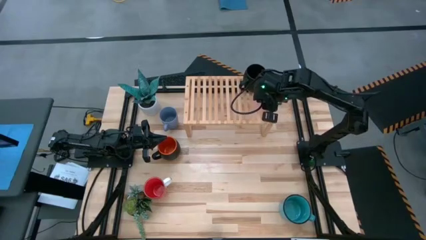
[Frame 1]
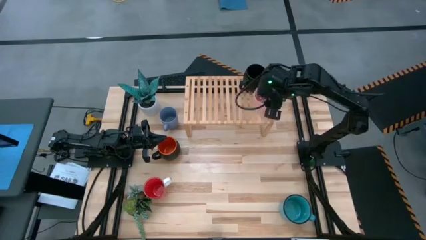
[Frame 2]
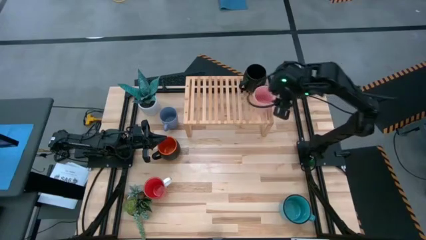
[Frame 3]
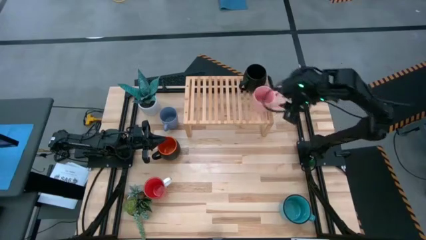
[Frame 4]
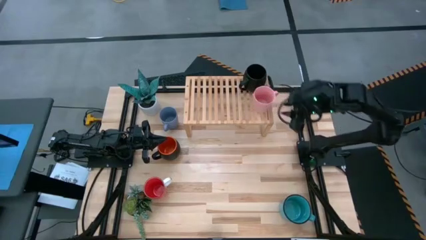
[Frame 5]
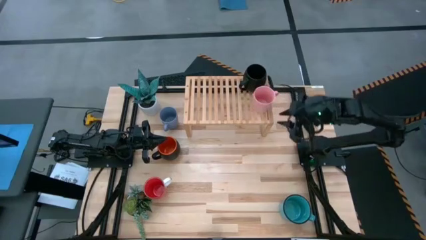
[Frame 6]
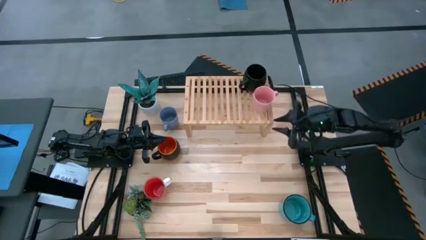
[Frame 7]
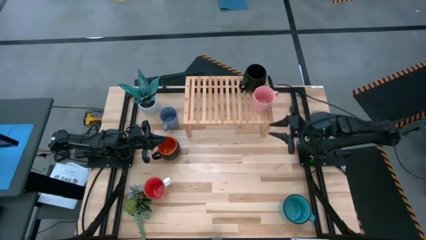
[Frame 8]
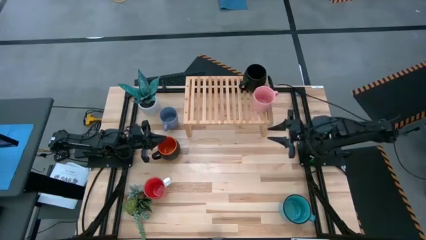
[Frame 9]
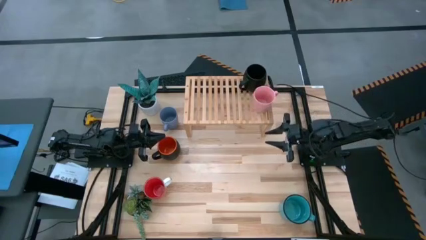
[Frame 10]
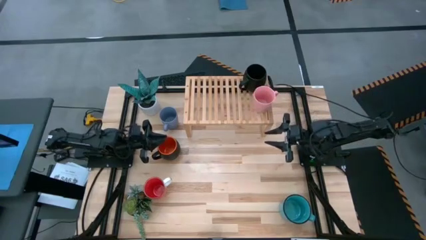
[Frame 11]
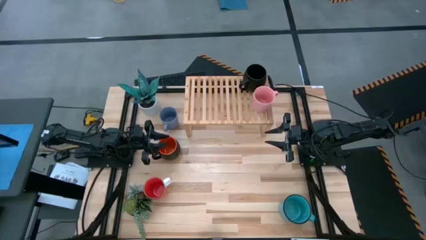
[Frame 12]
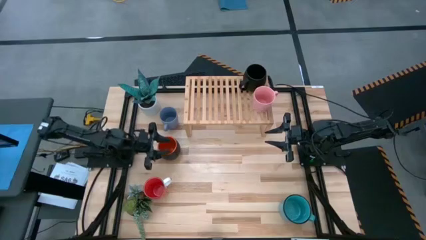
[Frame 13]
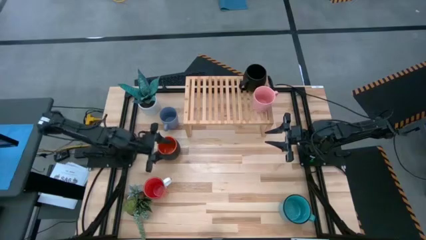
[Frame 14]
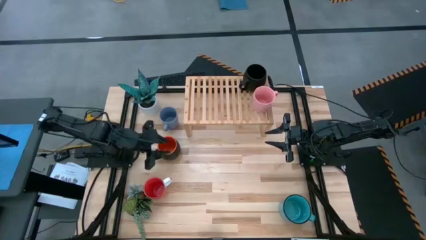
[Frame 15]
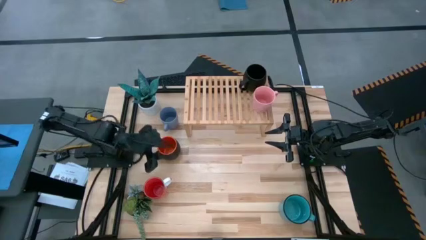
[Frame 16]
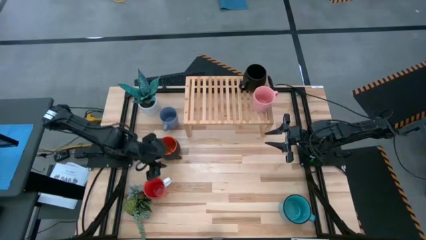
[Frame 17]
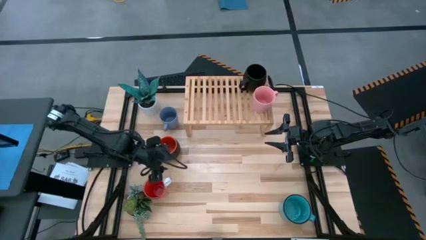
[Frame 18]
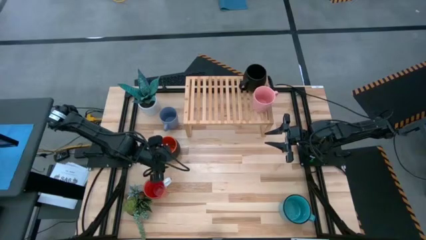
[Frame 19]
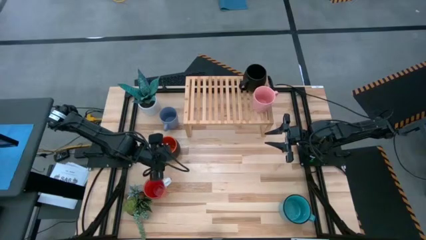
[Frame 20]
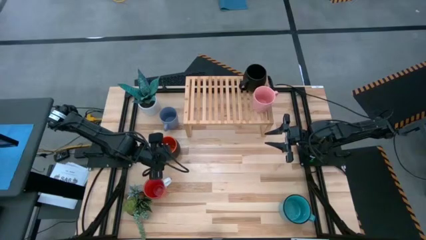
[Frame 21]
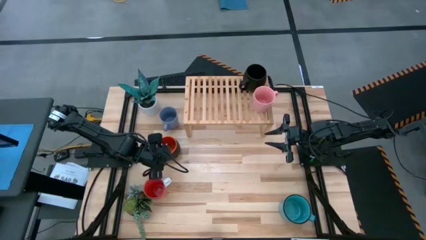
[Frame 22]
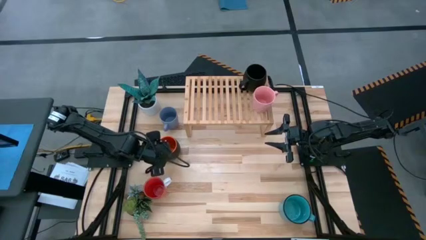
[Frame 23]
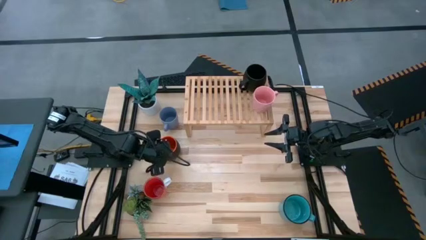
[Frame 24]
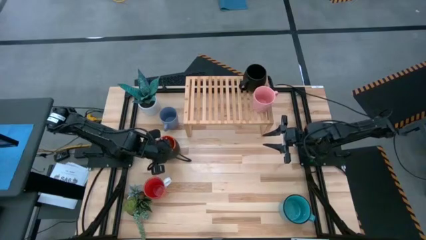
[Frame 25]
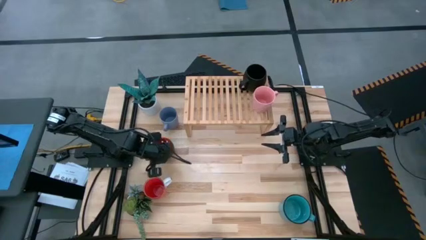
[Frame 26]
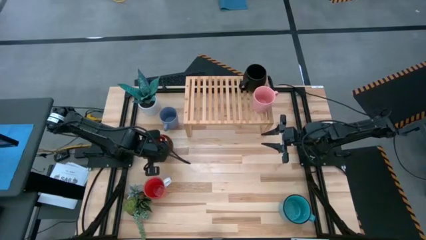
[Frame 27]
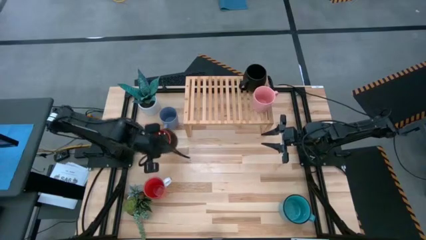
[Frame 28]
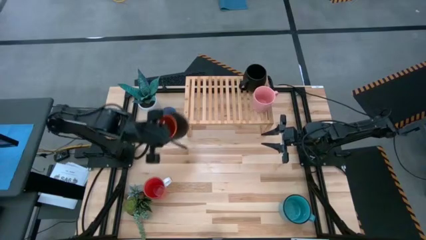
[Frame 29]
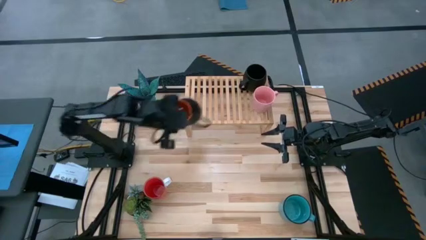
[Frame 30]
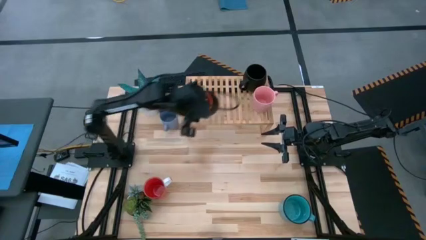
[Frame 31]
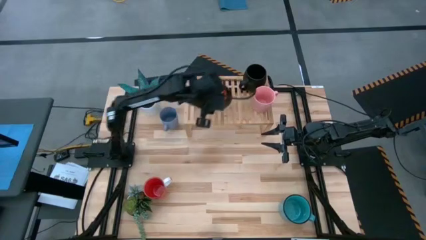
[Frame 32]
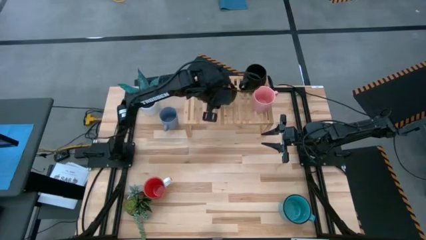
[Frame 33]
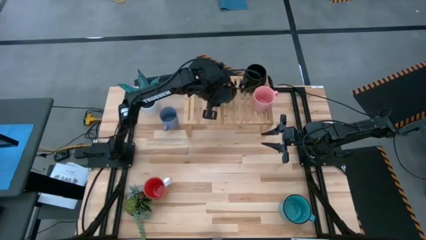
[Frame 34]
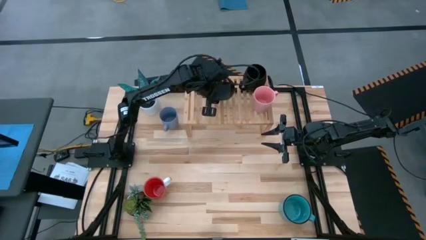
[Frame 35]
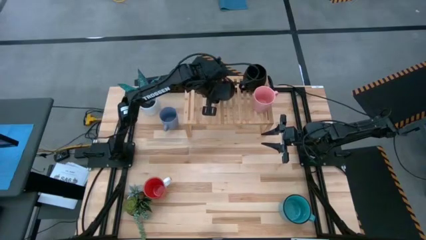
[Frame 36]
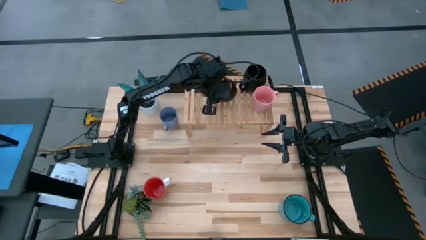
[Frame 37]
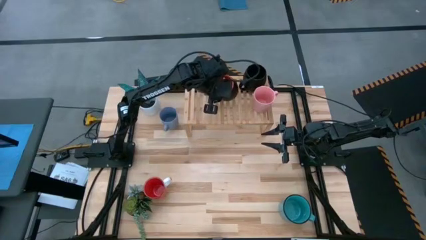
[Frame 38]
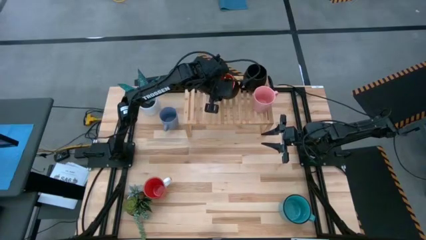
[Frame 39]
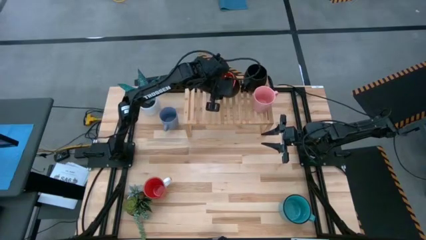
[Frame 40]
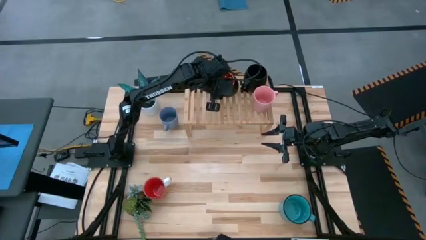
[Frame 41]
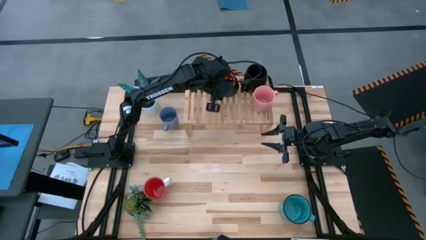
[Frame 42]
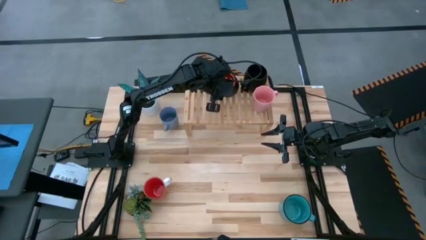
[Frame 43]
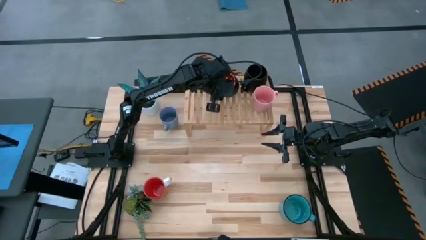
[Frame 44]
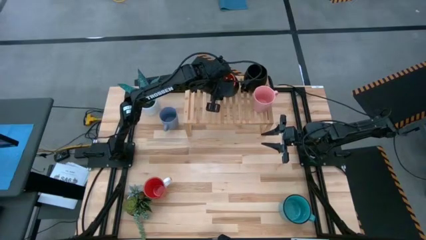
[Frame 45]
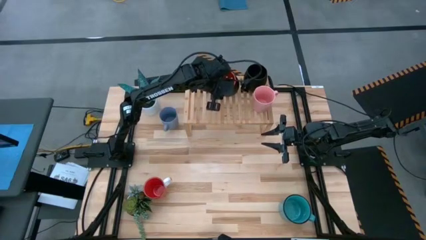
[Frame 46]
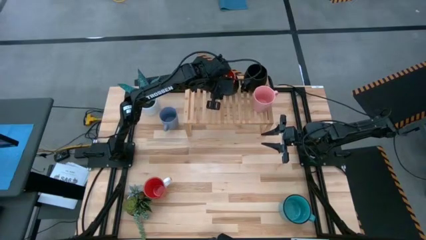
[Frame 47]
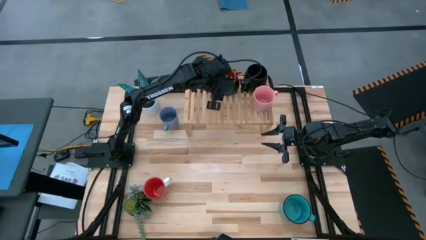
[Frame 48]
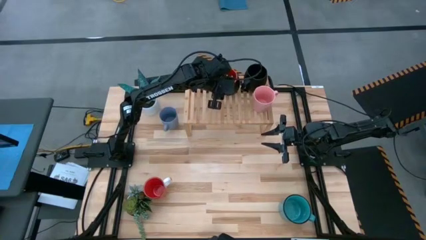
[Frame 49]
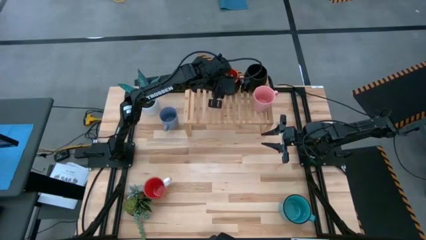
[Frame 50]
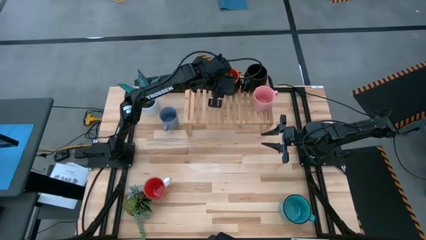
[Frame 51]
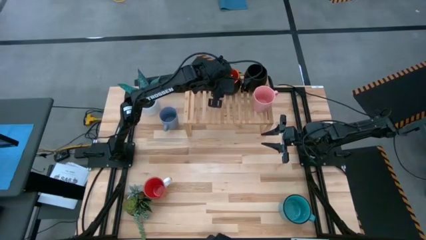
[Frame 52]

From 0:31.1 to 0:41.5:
Task: Place coffee mugs
Put the orange mug on the shelf
